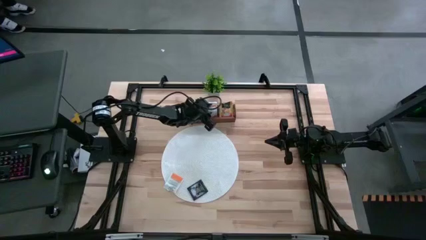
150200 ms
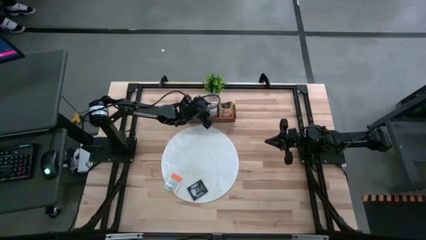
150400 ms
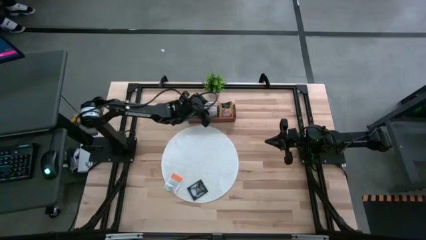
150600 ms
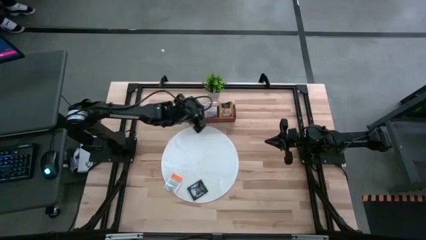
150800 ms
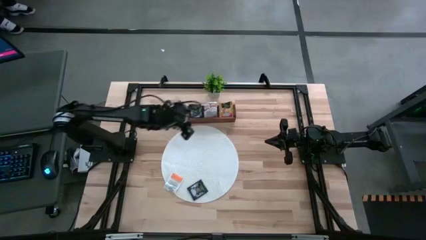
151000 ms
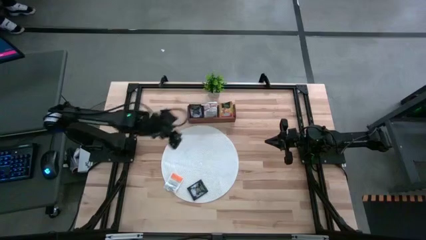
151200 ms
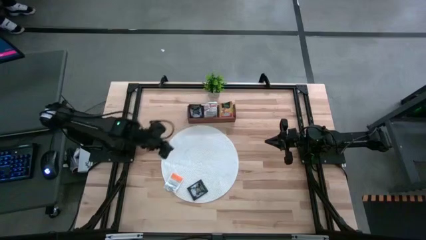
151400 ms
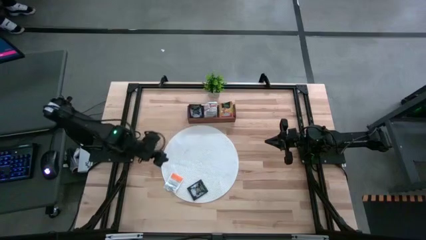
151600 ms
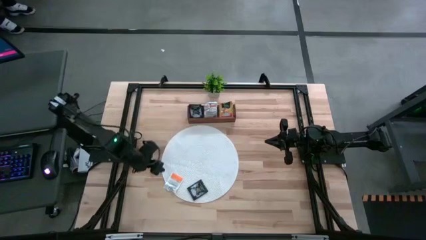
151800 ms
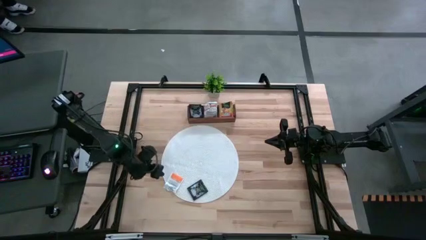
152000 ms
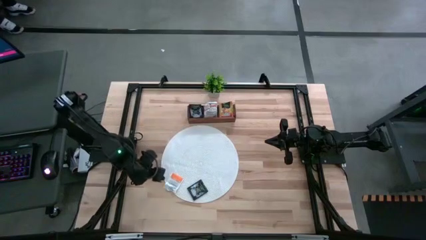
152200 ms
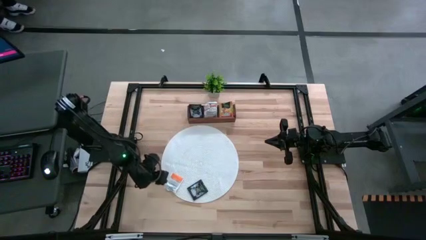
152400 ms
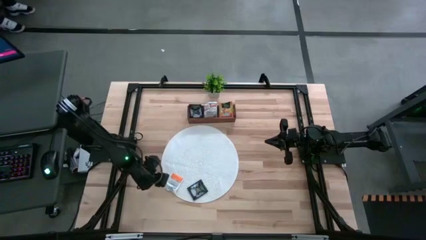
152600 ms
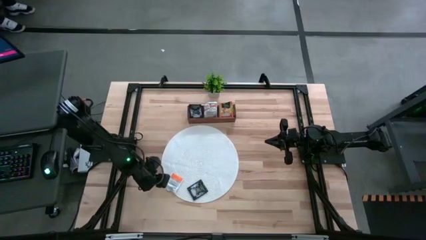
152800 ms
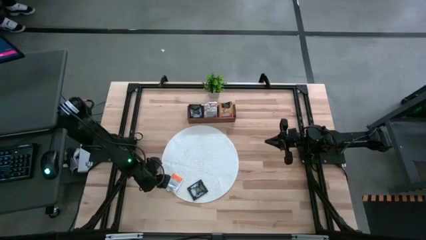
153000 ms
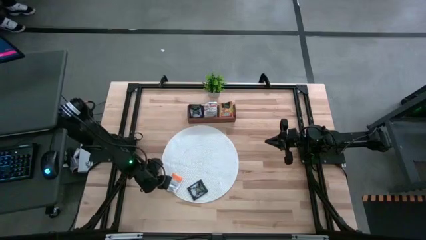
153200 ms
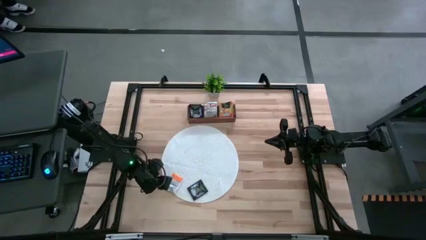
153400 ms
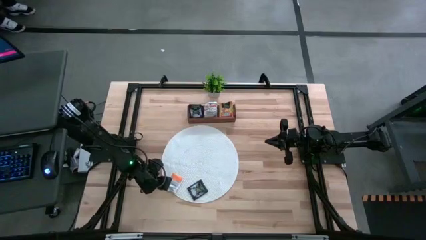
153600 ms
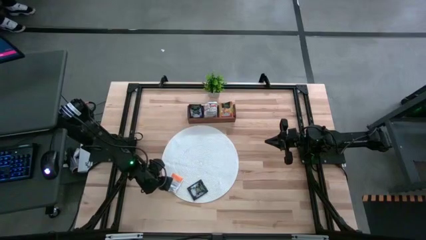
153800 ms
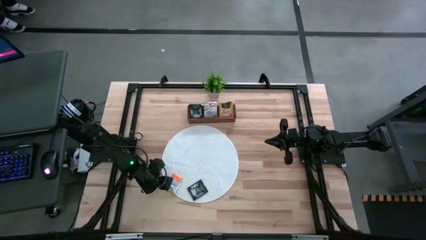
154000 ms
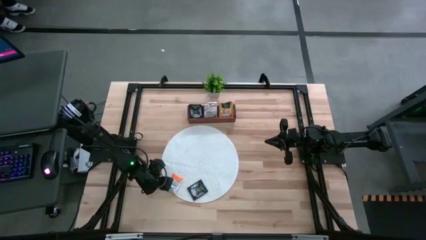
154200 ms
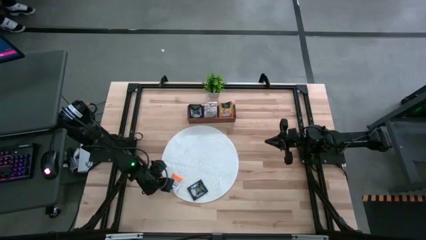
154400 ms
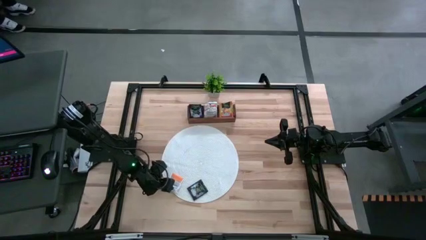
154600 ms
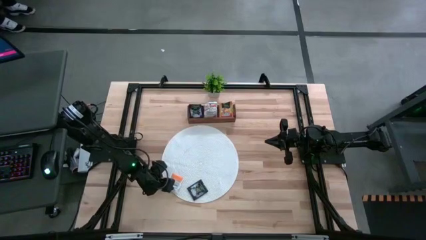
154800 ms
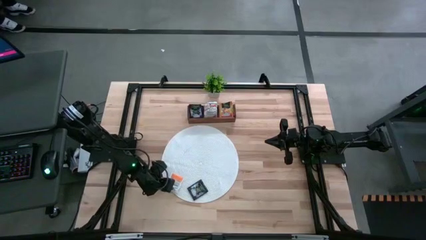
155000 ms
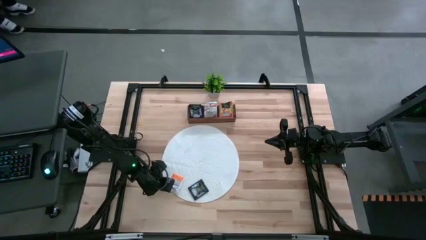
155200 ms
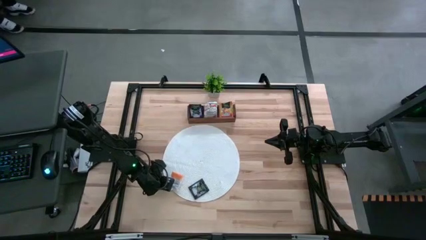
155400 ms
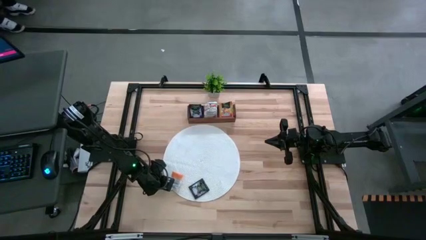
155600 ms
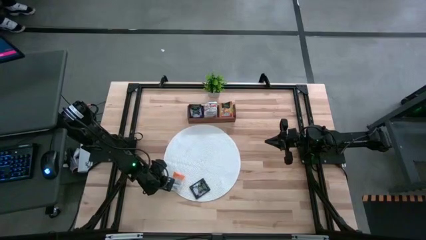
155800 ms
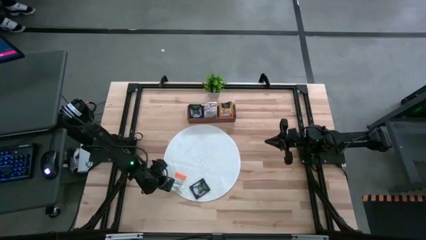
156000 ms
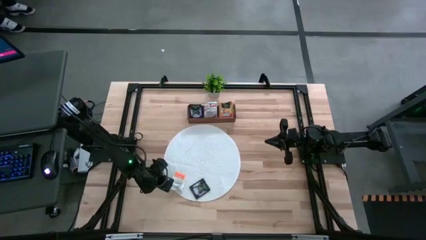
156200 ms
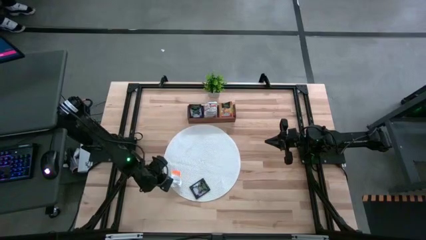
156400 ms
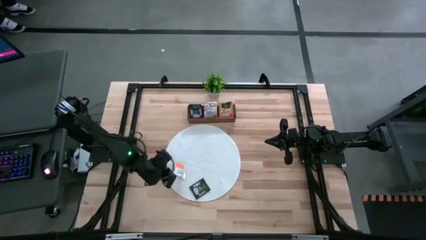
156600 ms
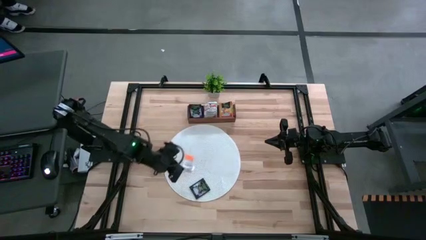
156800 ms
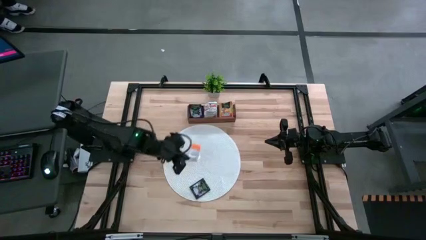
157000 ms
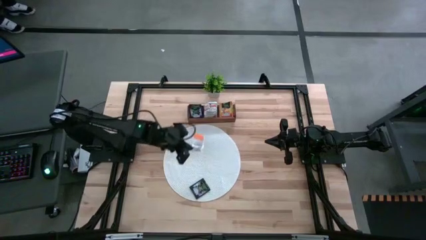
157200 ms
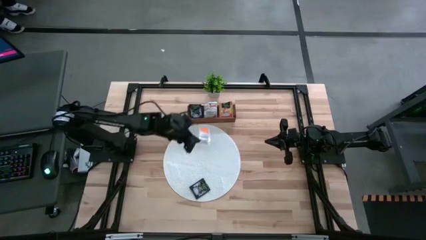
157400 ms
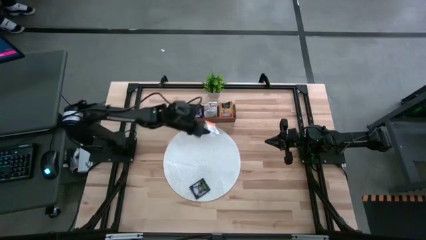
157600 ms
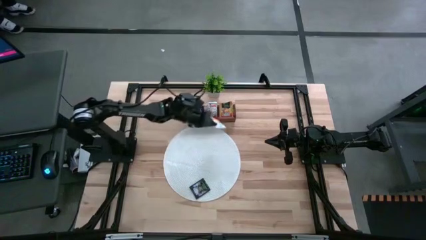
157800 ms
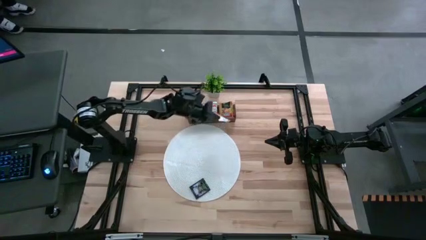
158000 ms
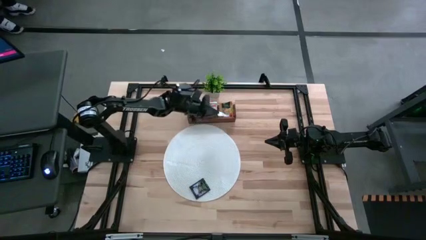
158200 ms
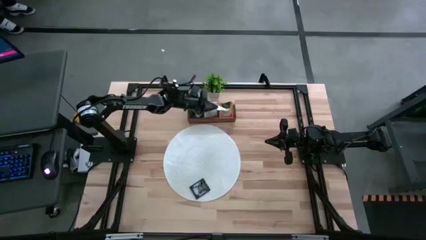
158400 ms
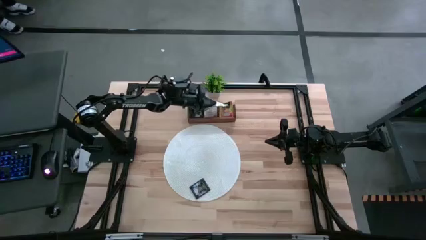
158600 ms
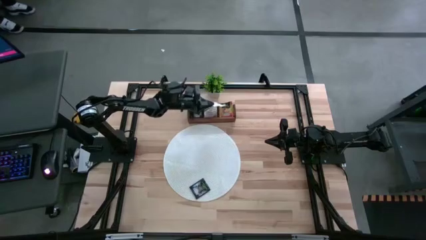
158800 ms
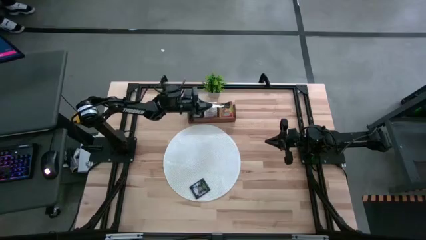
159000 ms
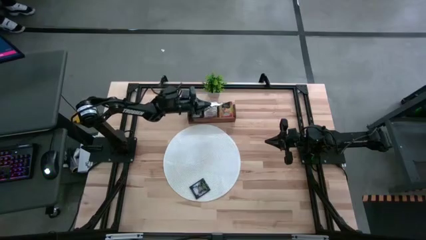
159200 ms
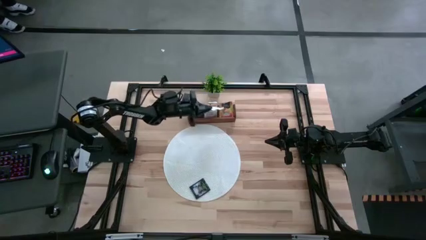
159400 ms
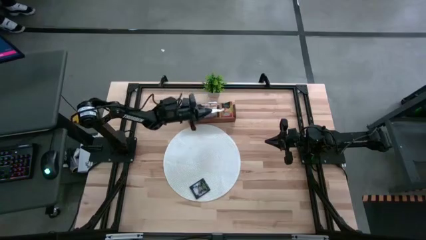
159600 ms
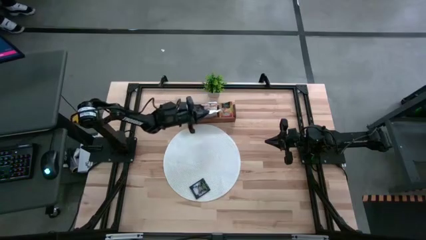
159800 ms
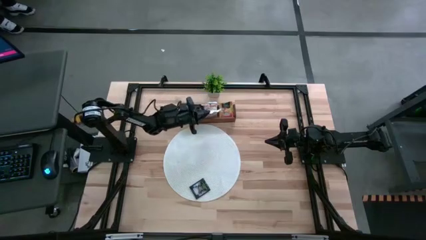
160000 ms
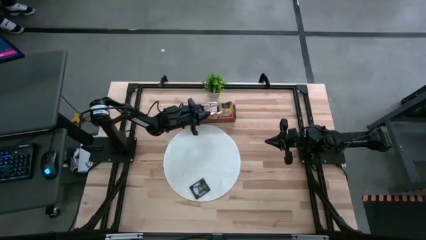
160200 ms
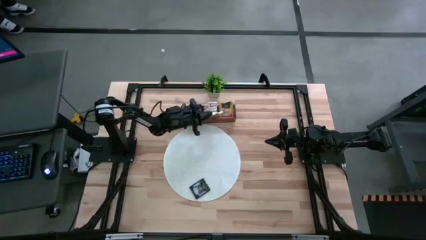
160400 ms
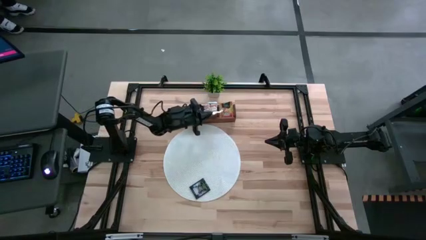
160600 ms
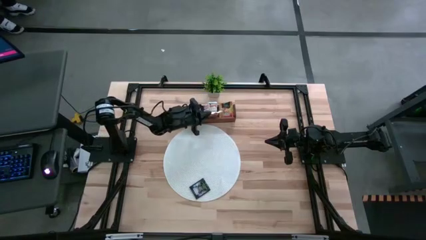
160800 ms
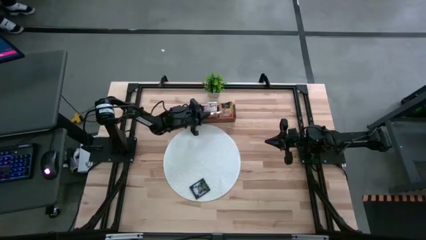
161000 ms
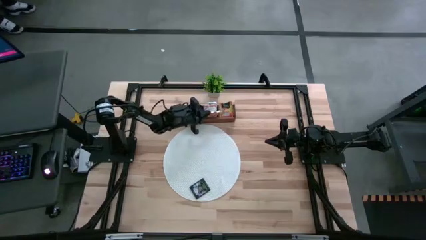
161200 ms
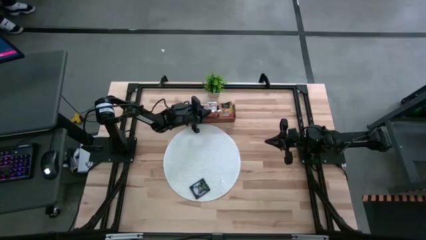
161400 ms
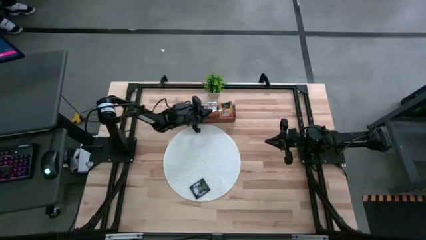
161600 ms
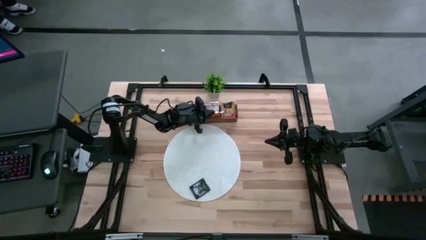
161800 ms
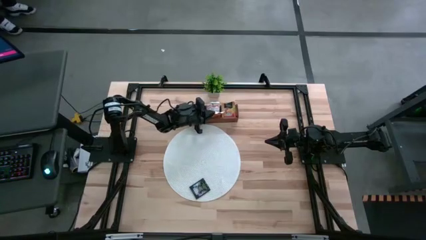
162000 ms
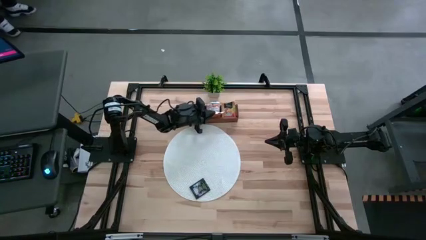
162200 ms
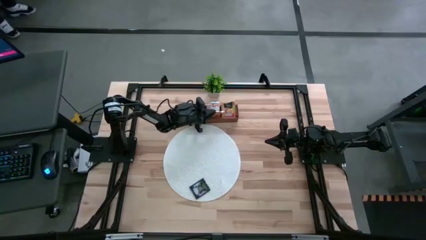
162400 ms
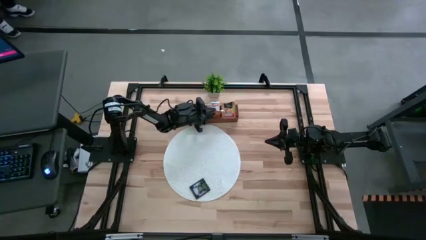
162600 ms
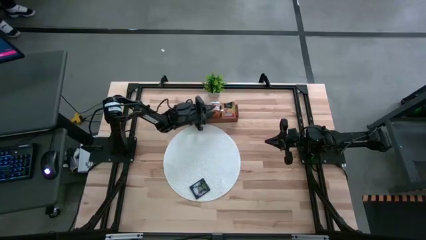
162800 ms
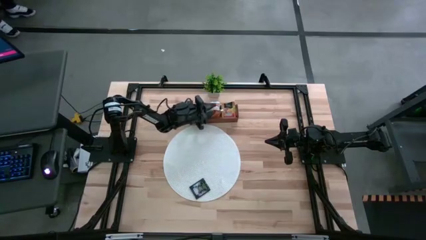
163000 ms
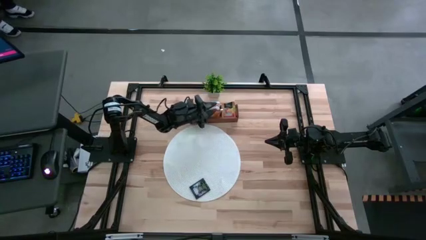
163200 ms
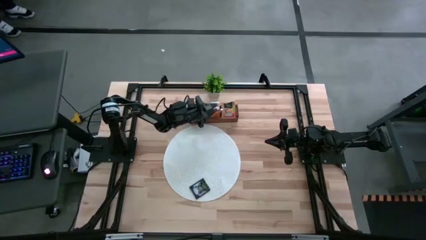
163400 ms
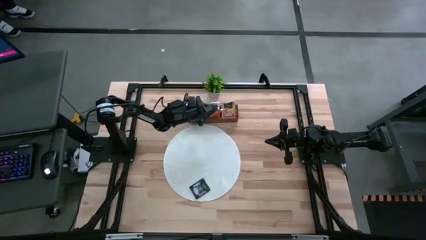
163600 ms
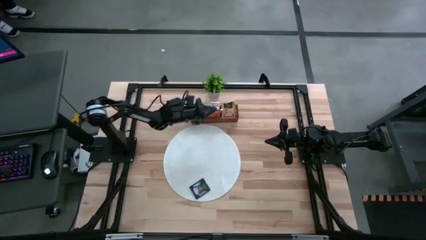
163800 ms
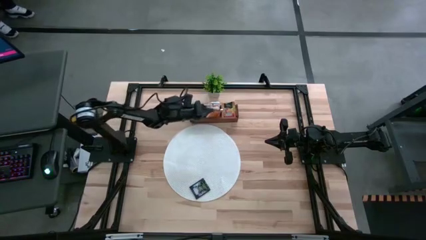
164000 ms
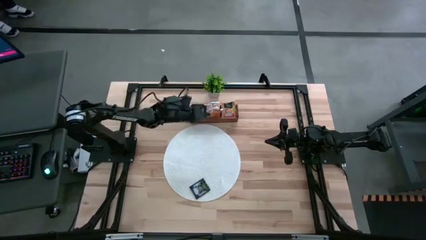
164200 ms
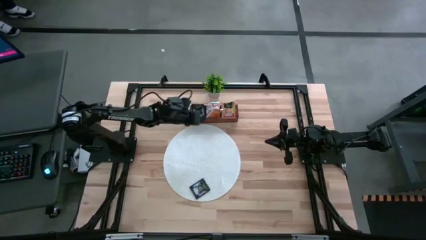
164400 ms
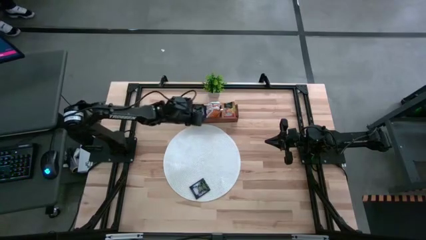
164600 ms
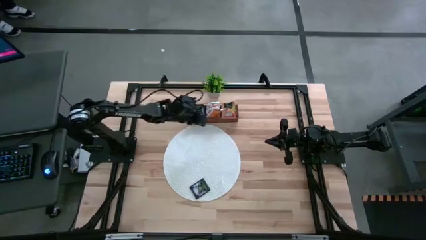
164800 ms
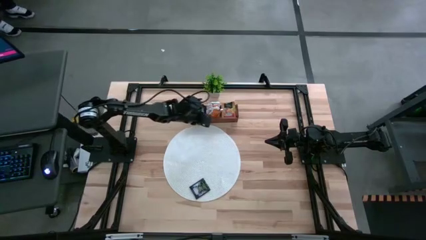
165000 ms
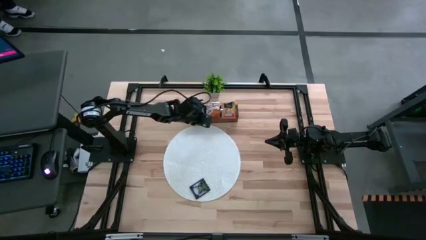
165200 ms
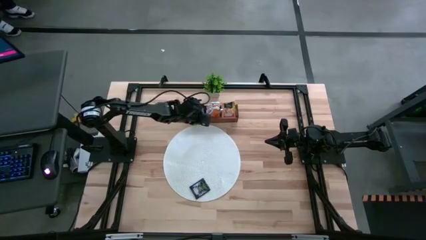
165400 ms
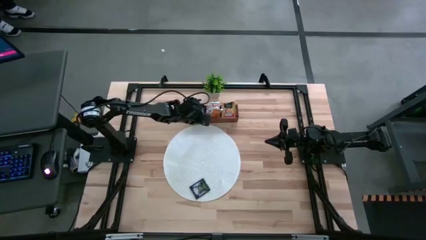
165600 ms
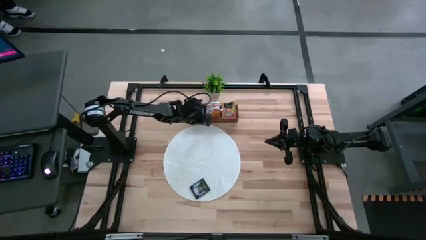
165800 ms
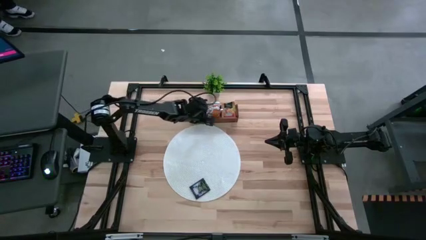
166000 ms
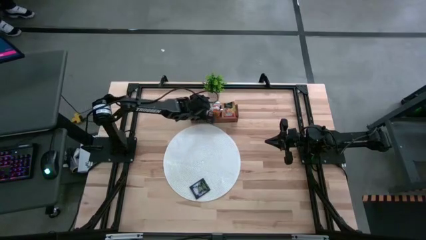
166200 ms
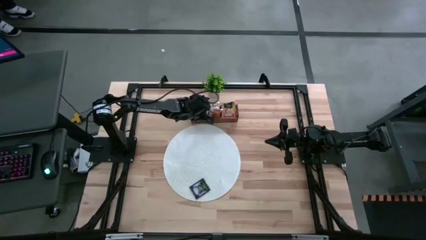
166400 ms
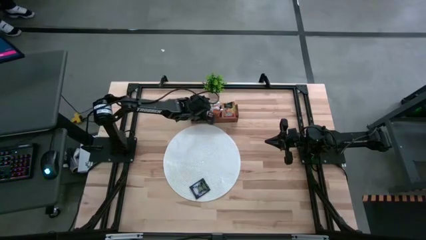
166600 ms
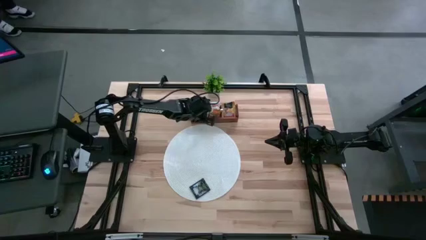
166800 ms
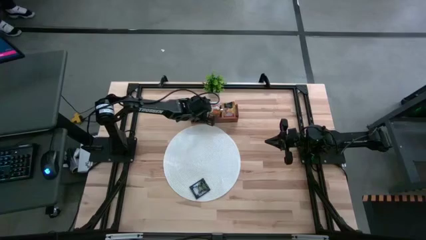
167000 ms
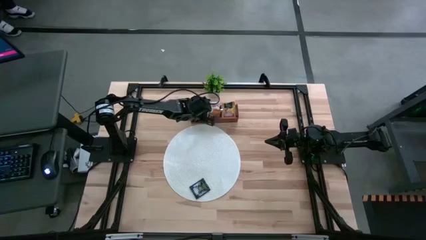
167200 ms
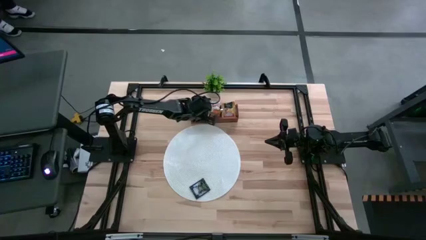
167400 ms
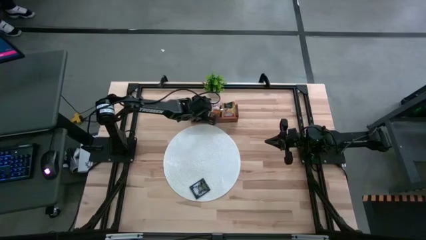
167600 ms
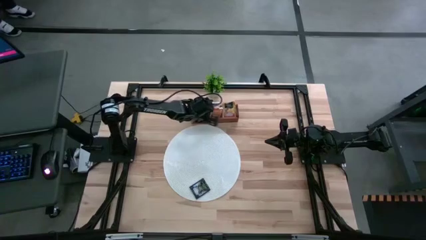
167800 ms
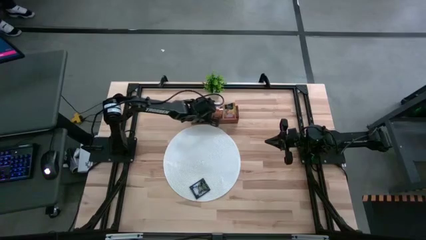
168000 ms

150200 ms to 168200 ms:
Task: Pick & Place Tea
Put the orange tea bag into the middle section of the wooden organizer
